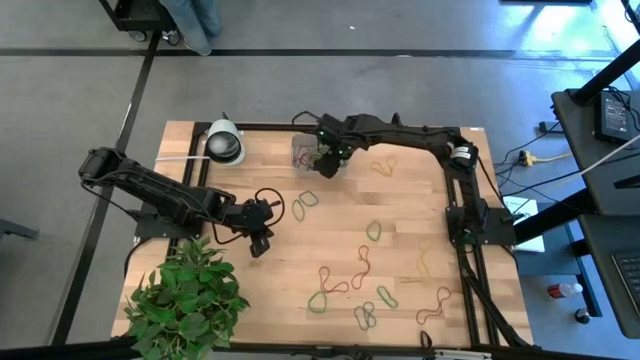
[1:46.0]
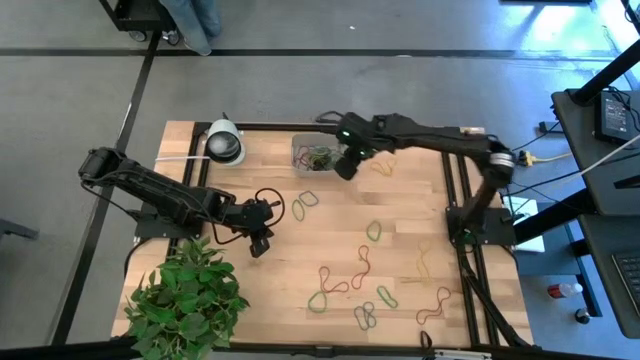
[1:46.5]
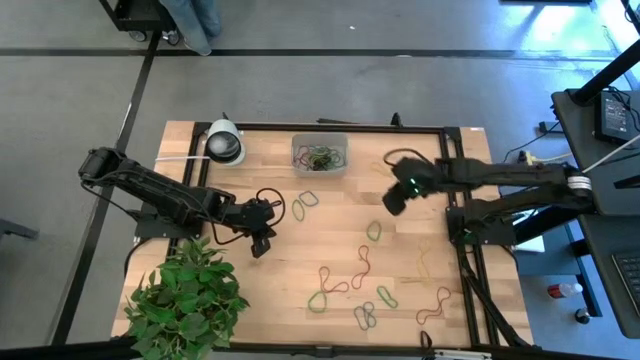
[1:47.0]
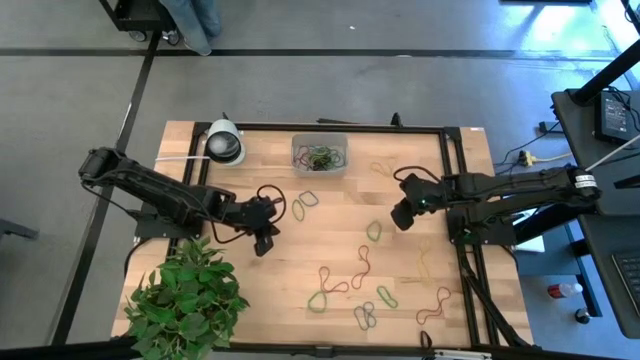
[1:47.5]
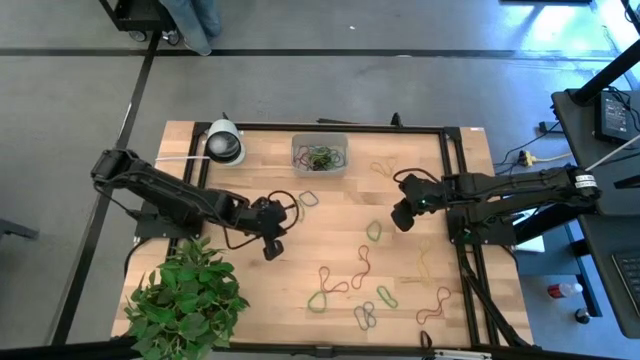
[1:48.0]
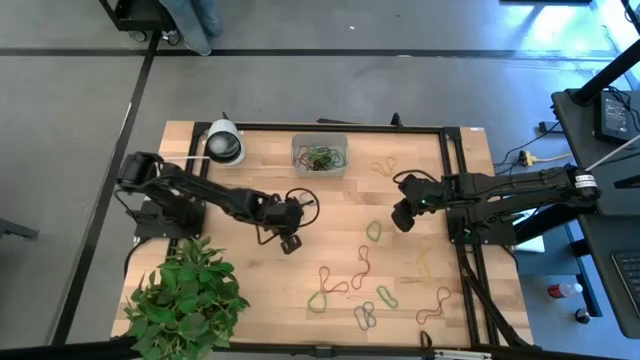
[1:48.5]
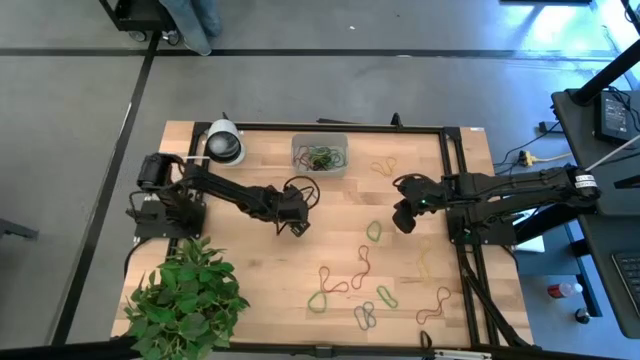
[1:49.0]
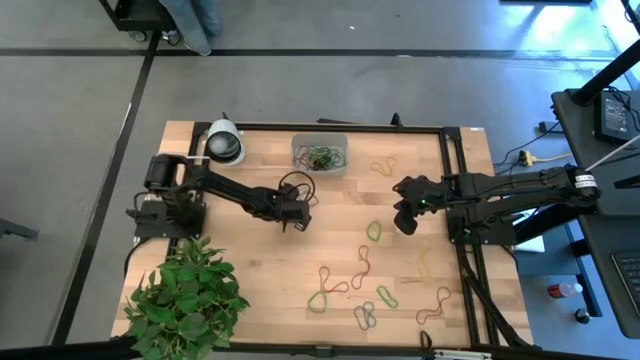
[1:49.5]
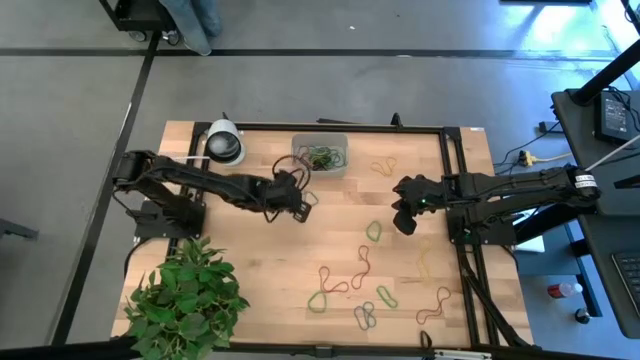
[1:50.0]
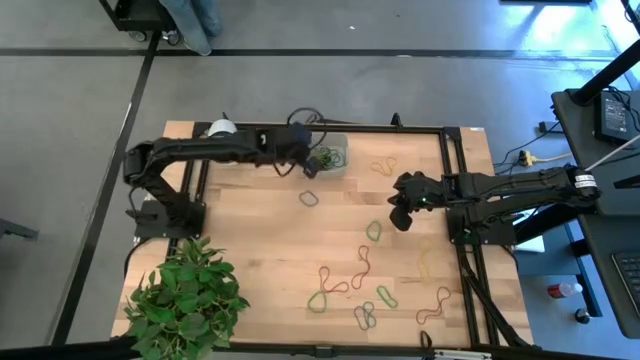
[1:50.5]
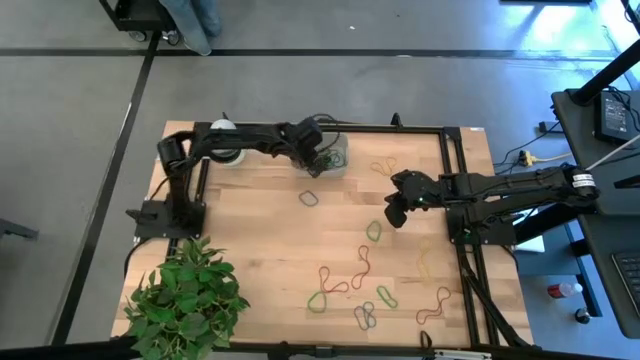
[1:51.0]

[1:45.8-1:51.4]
Task: Pick and place rubber bands into bin
Put the green rubber band into the white bin

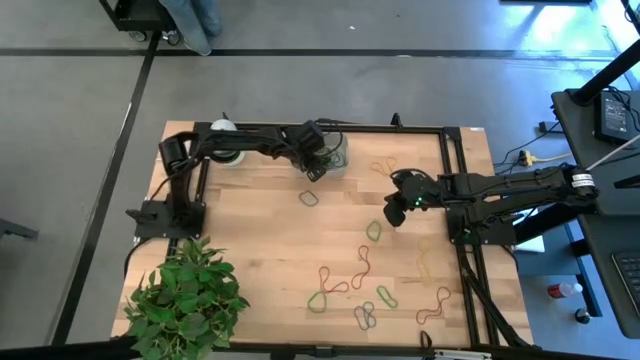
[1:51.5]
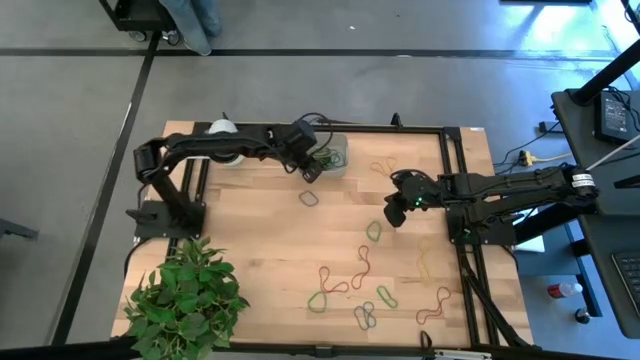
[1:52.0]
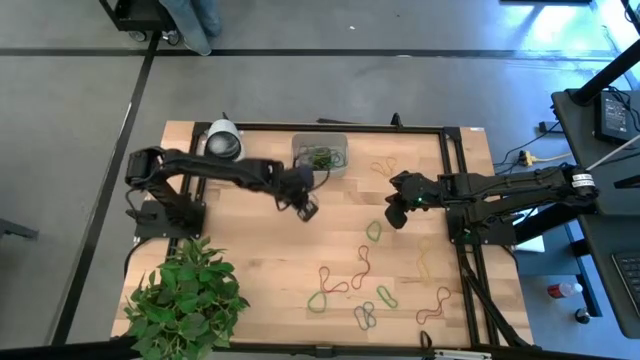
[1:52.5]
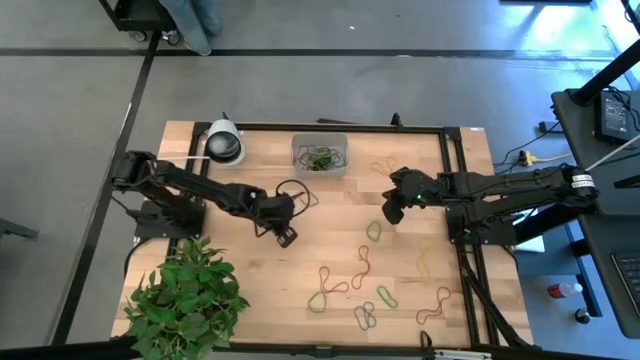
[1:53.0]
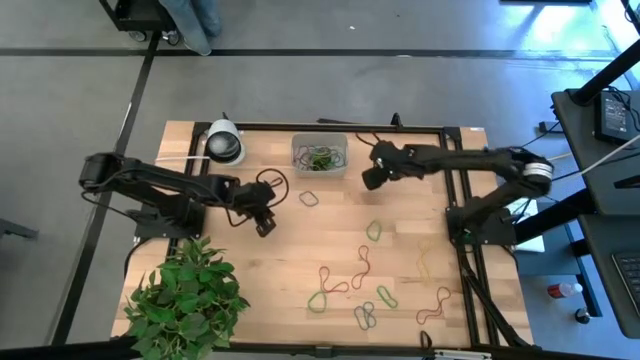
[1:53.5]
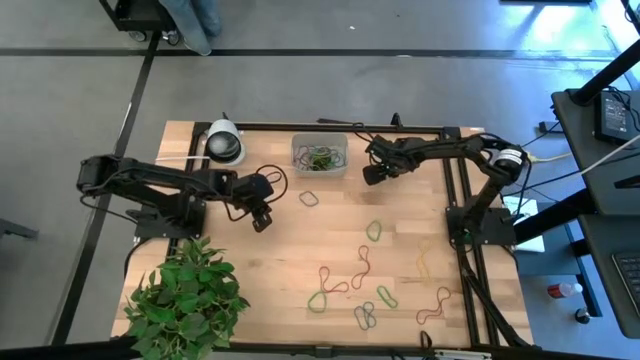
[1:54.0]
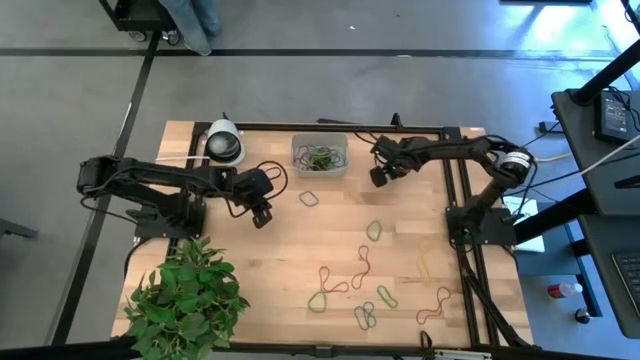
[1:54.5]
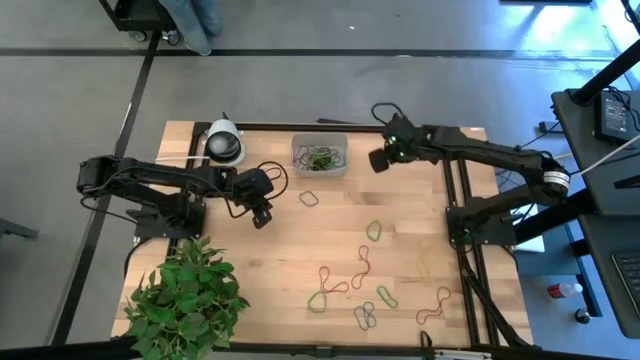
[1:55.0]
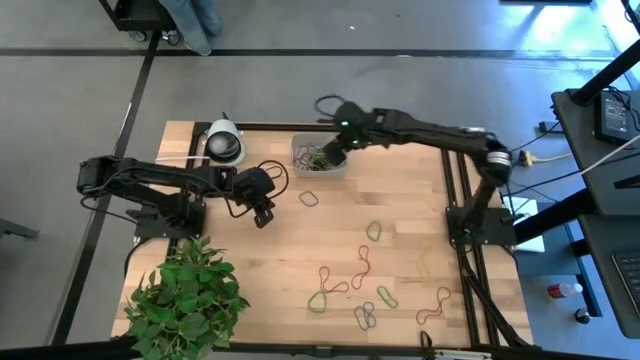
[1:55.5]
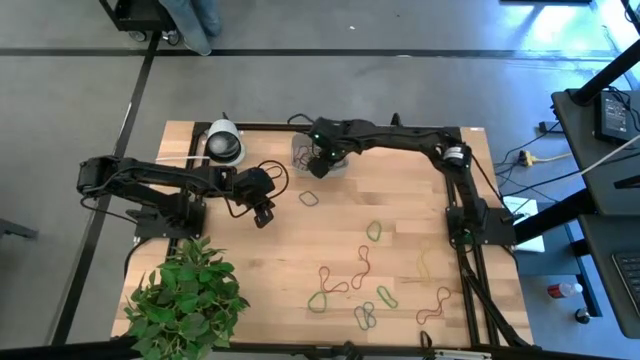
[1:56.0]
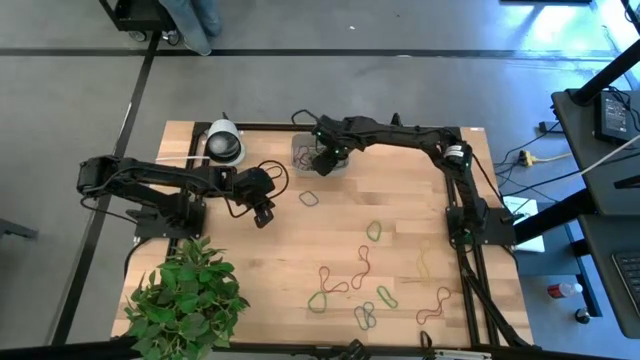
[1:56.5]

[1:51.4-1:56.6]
Put the yellow rubber band into the white bin

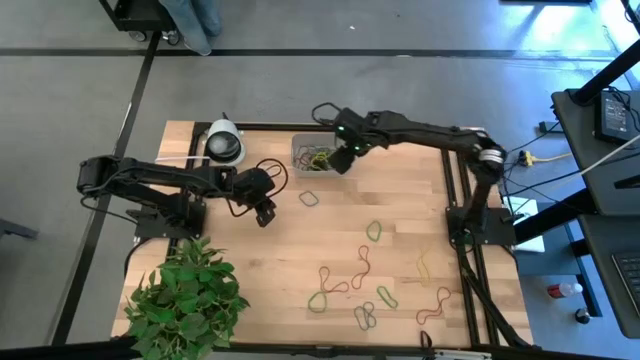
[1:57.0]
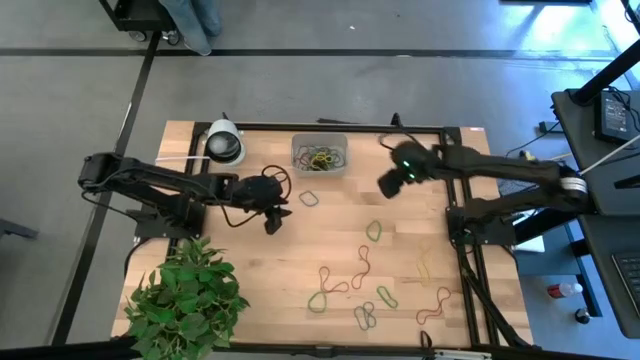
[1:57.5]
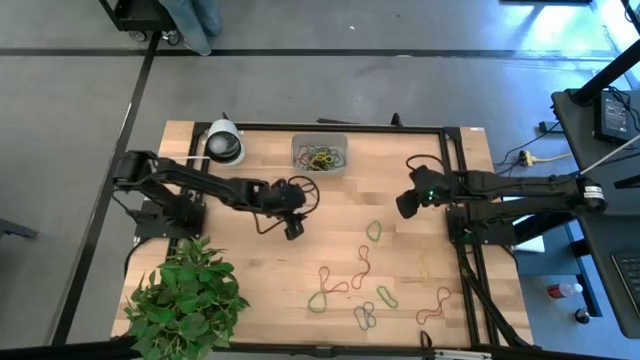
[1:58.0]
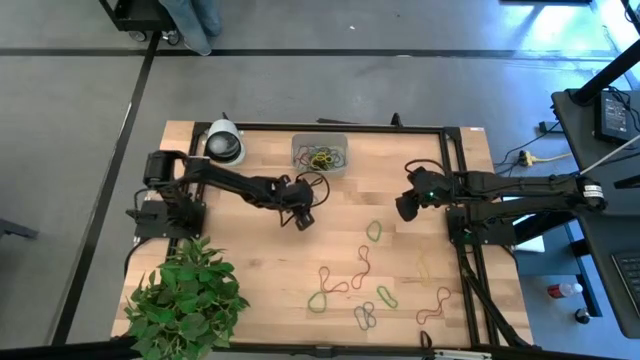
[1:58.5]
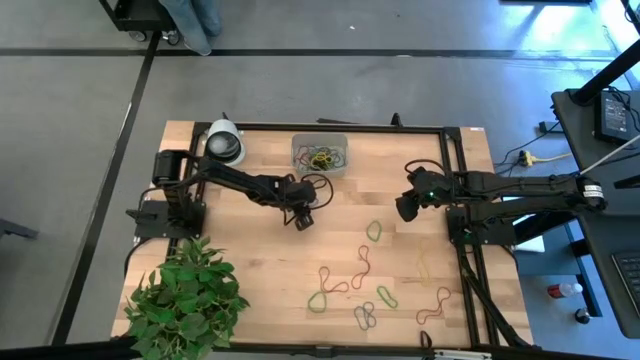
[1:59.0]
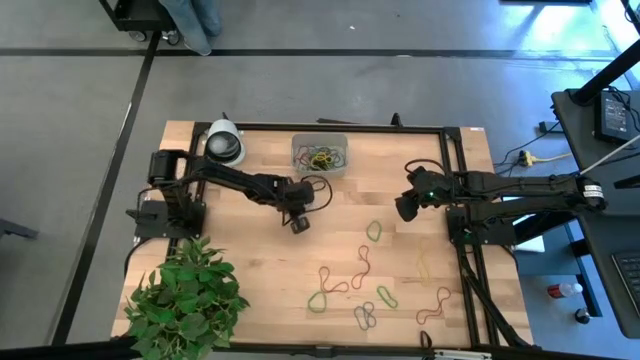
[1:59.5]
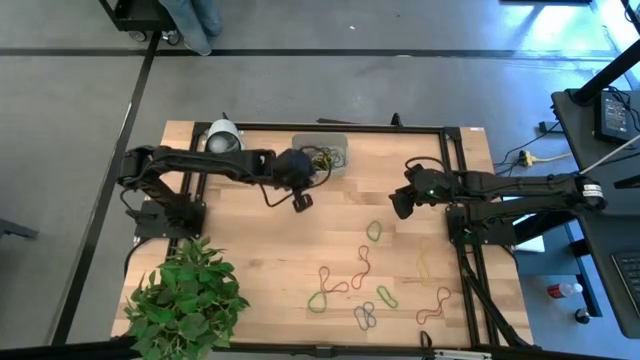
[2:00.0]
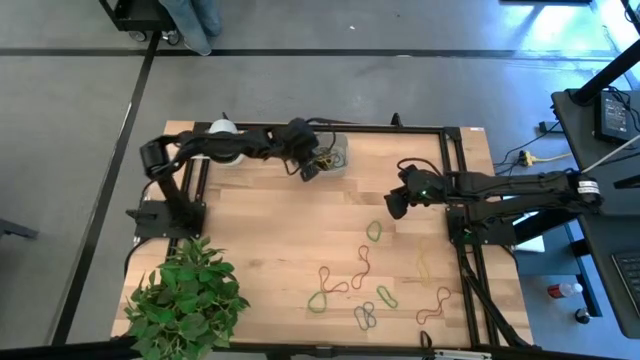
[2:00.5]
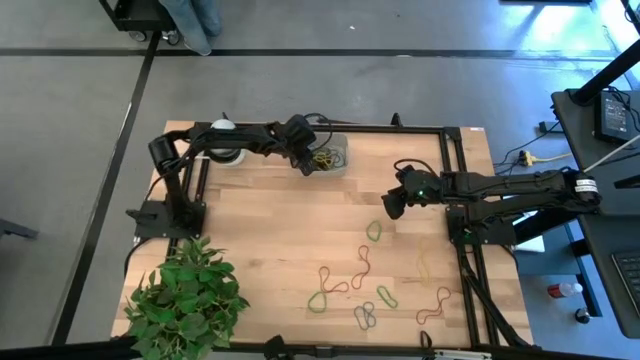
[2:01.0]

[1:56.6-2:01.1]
Put the blue rubber band into the white bin

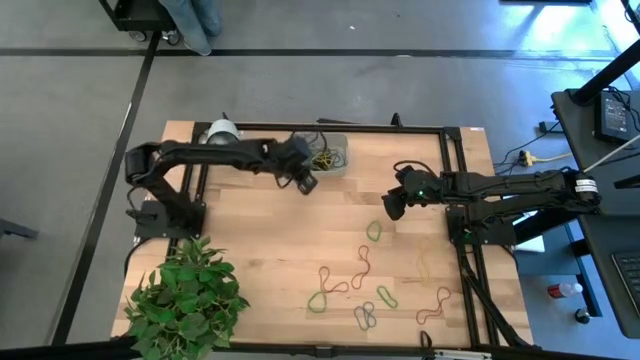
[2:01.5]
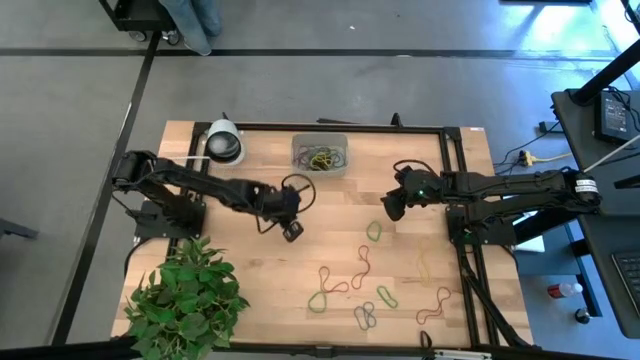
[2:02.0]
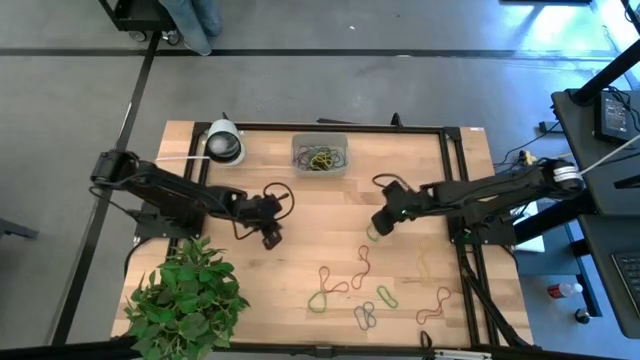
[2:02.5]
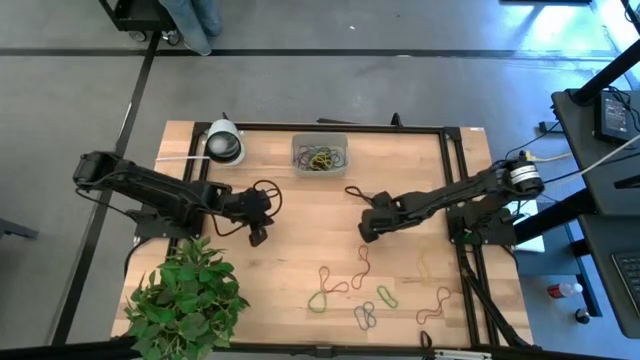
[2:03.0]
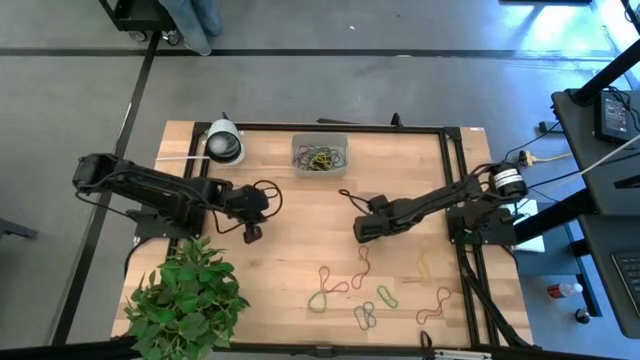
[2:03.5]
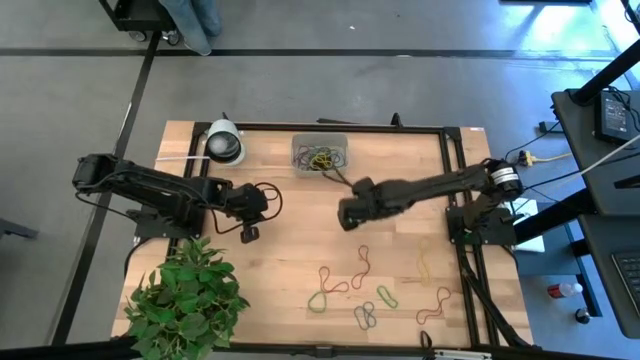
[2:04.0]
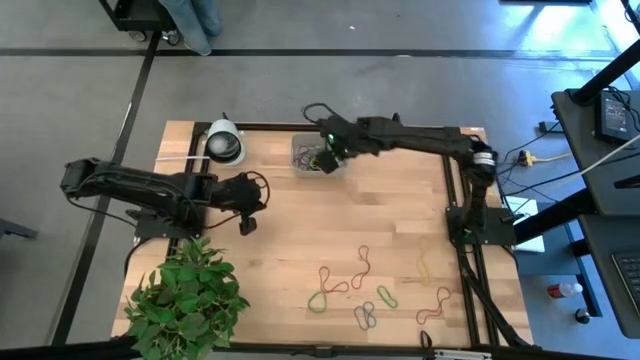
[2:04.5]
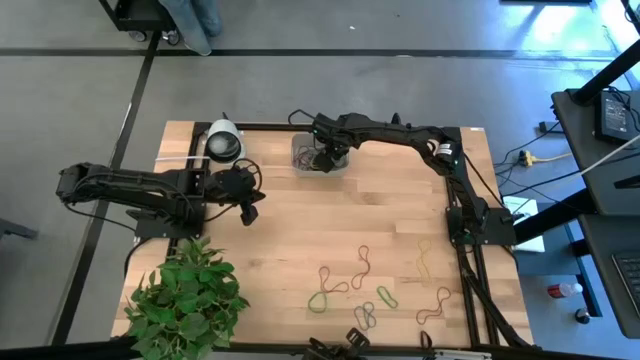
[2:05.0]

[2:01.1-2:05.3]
Put the green rubber band into the white bin

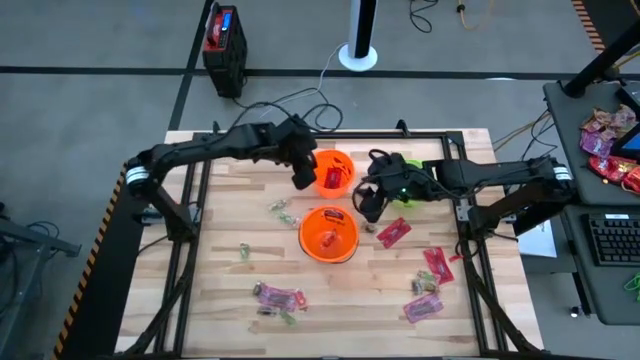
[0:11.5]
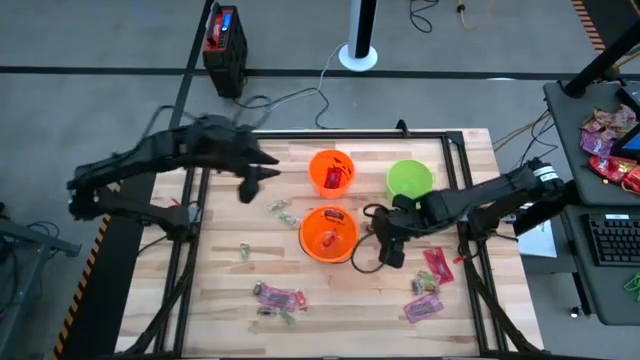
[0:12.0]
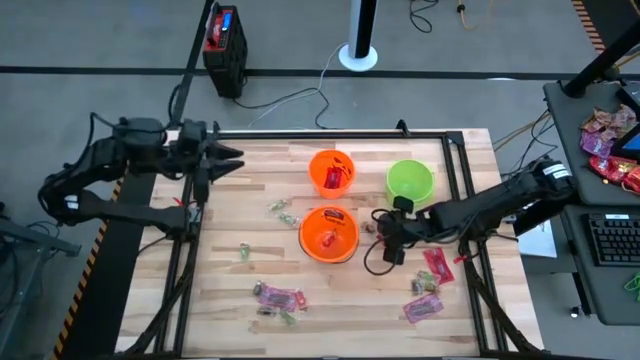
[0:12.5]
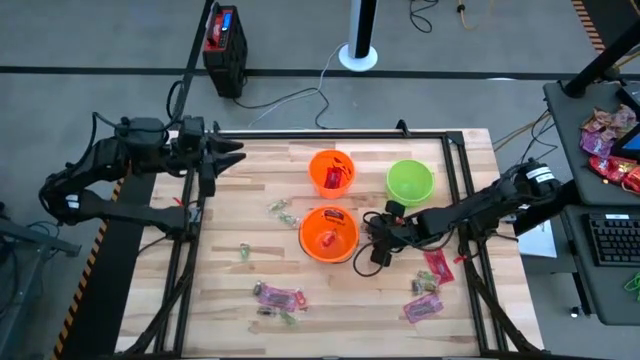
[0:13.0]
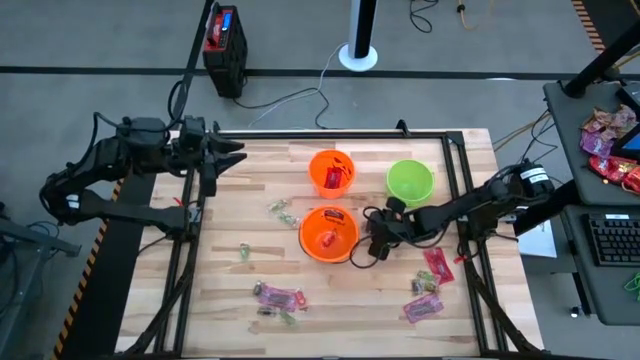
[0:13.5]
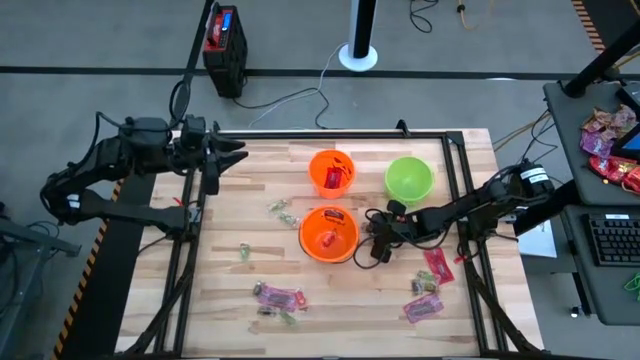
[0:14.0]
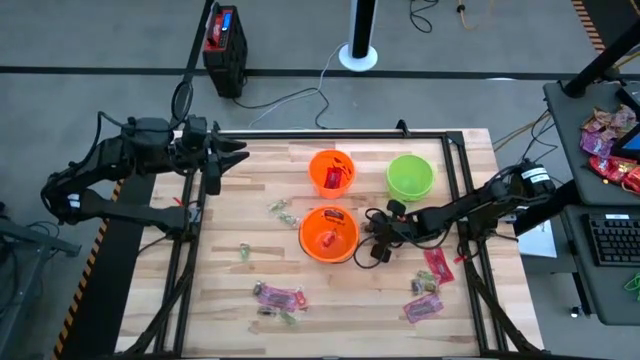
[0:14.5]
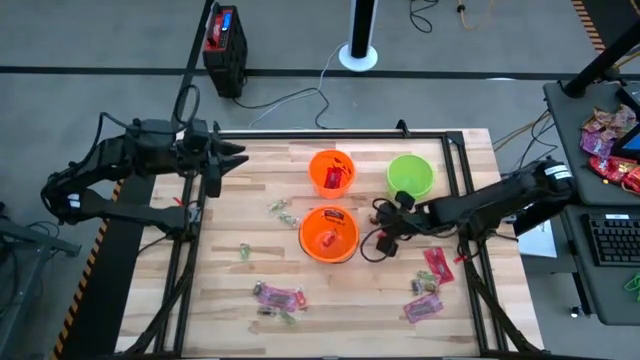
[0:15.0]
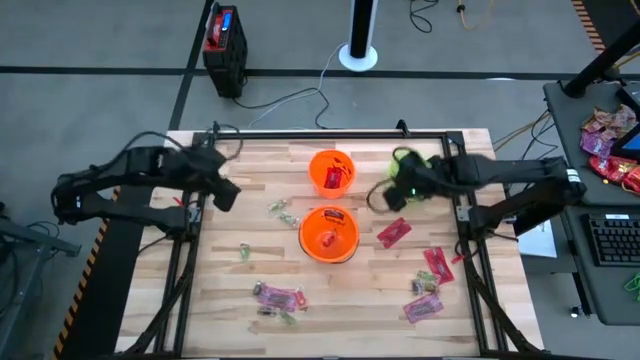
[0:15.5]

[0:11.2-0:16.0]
Task: Sort candy by brand, put in halloween buckets
Put the brown candy into the green bin
